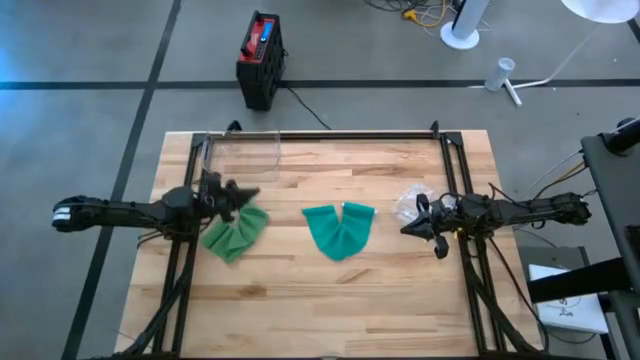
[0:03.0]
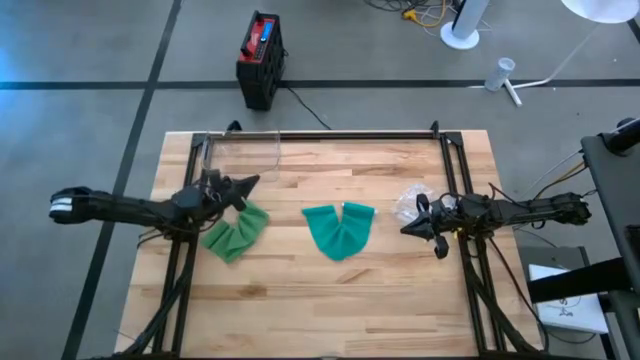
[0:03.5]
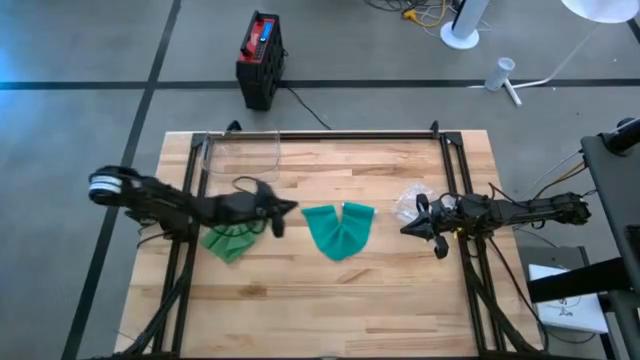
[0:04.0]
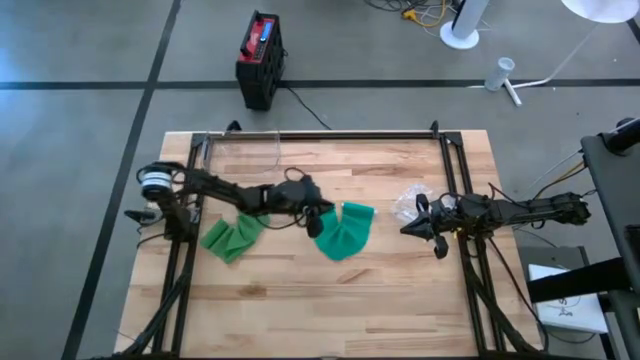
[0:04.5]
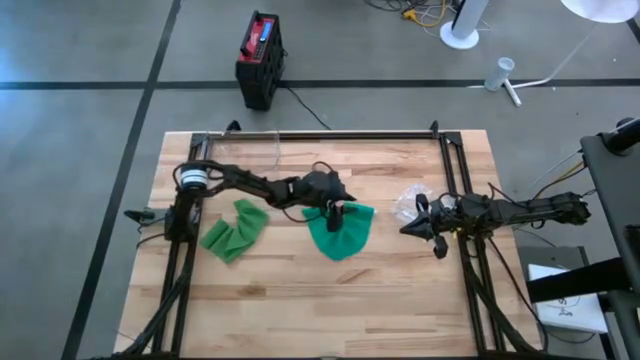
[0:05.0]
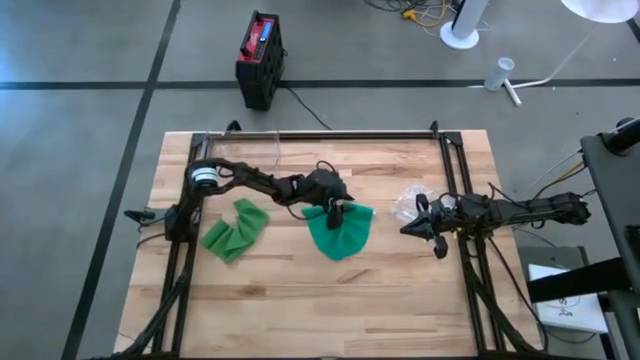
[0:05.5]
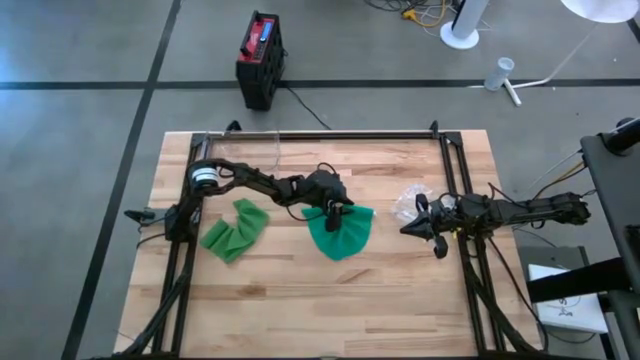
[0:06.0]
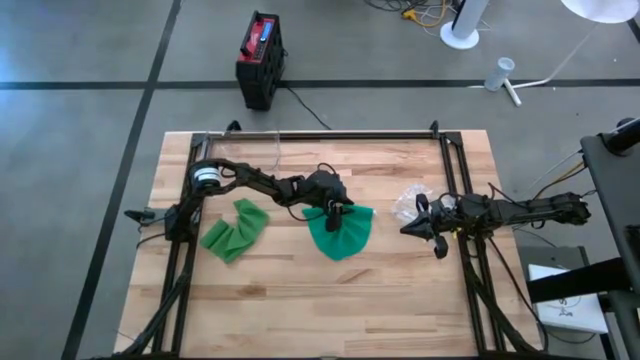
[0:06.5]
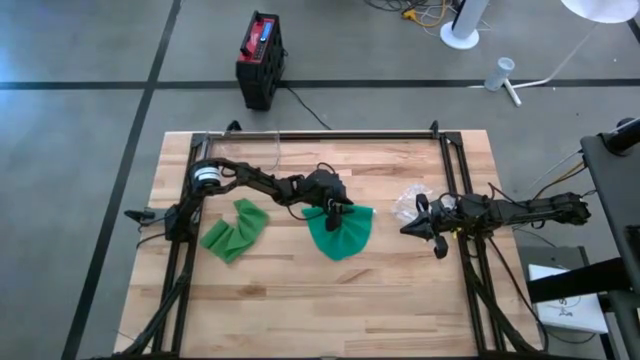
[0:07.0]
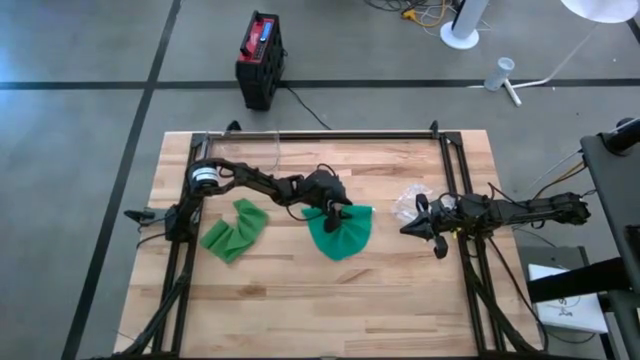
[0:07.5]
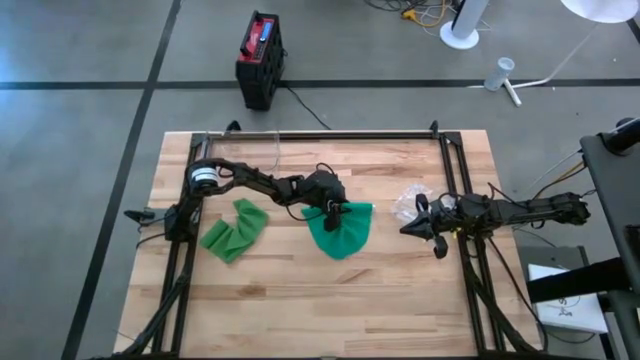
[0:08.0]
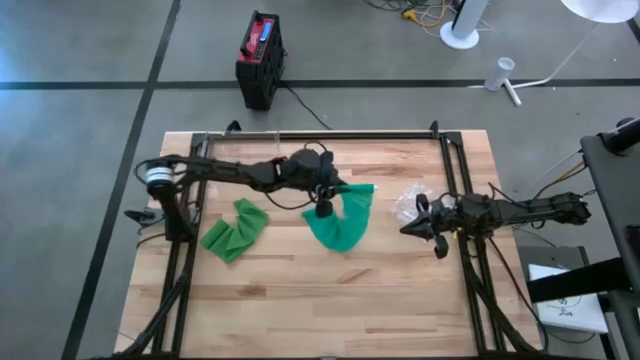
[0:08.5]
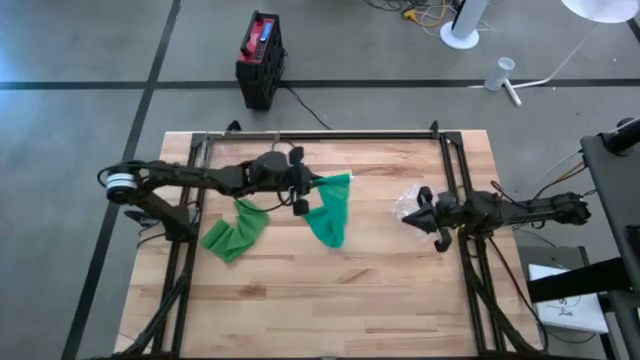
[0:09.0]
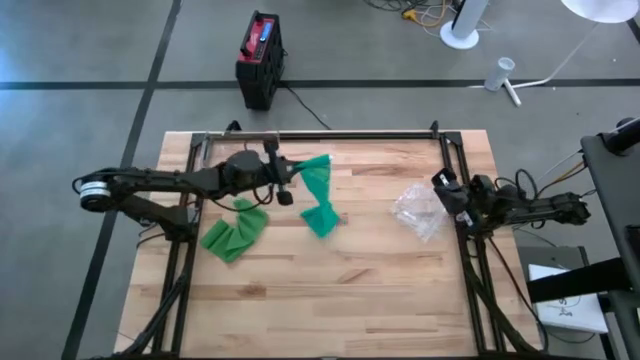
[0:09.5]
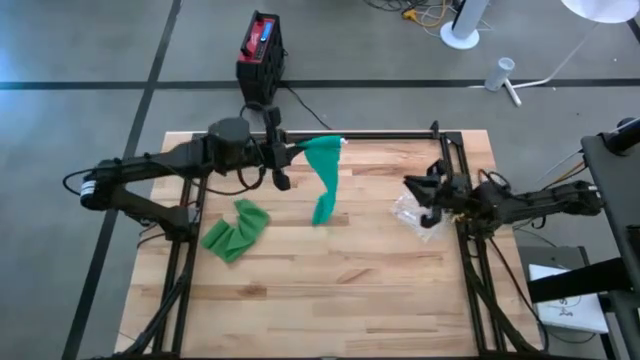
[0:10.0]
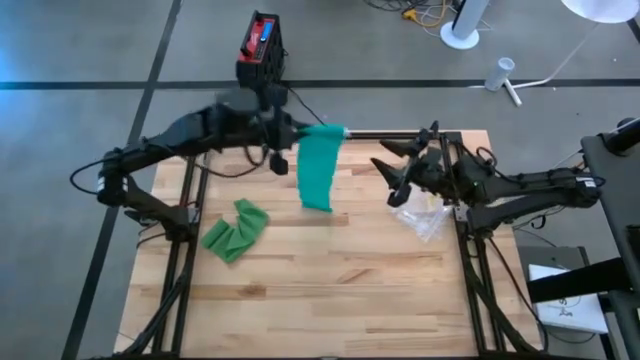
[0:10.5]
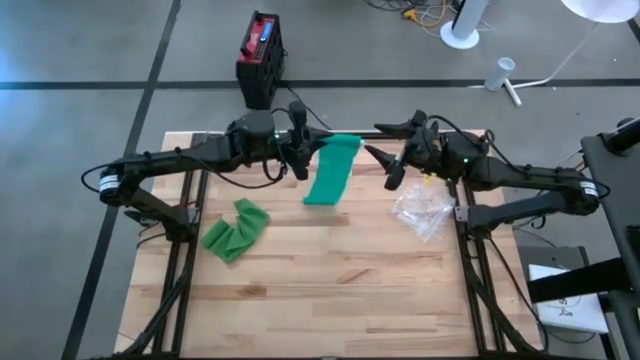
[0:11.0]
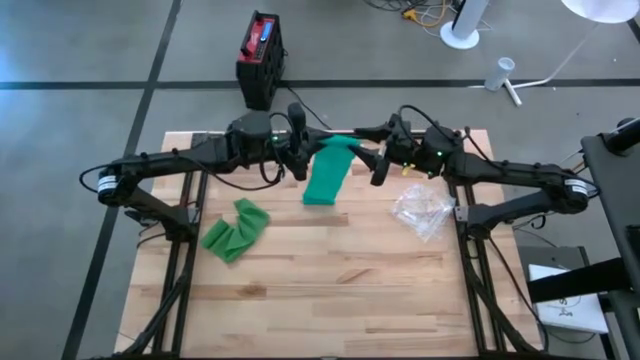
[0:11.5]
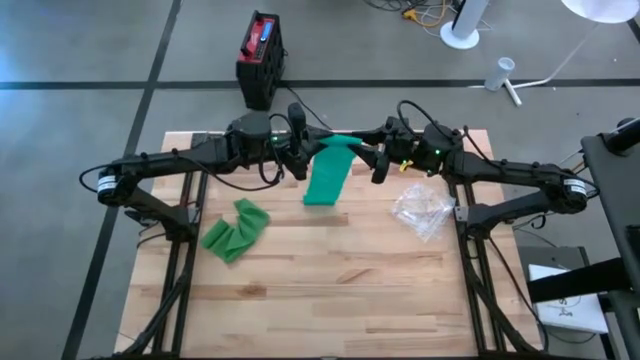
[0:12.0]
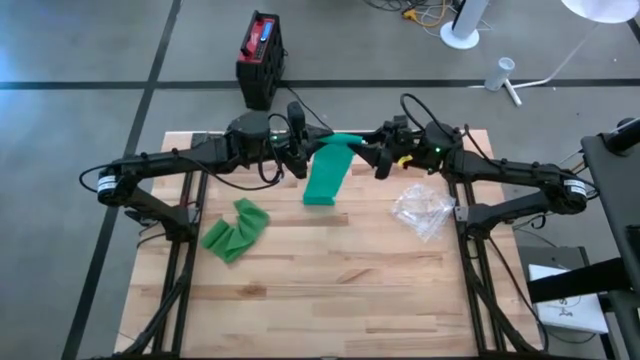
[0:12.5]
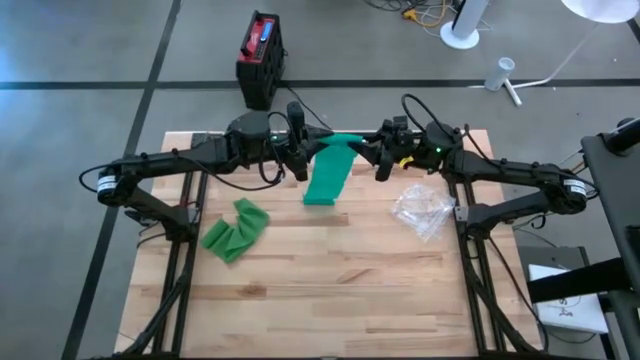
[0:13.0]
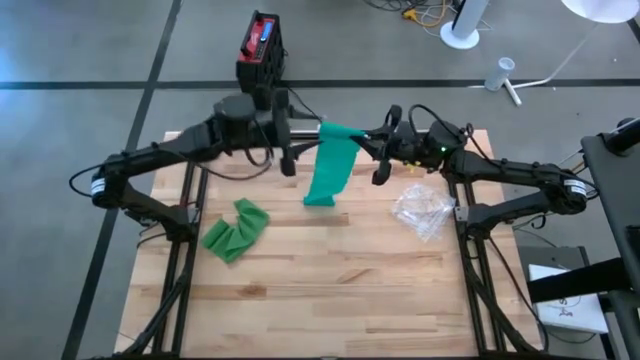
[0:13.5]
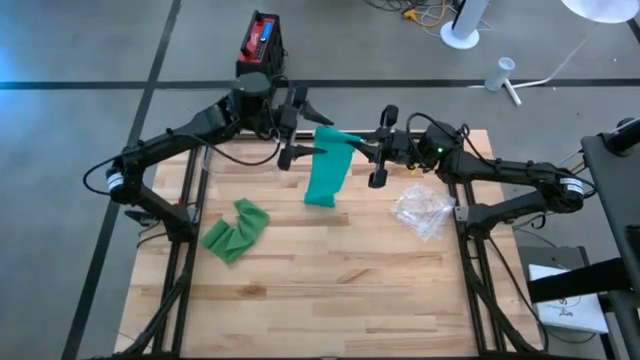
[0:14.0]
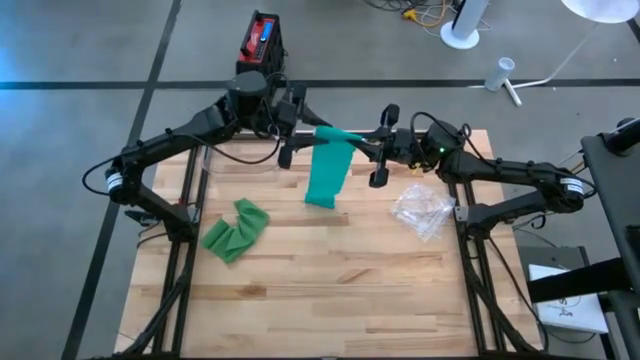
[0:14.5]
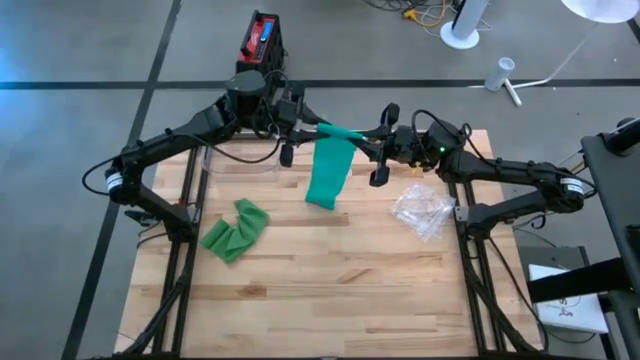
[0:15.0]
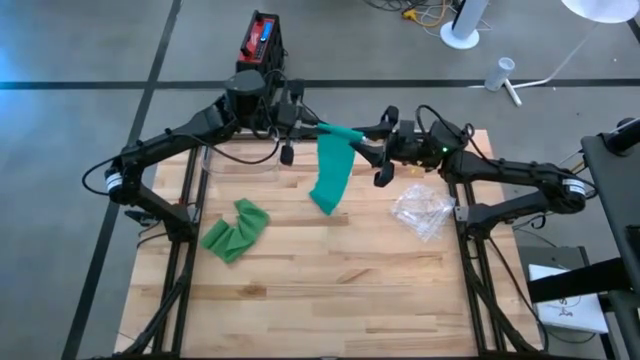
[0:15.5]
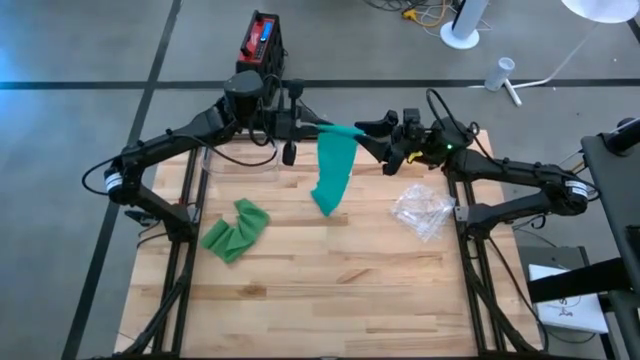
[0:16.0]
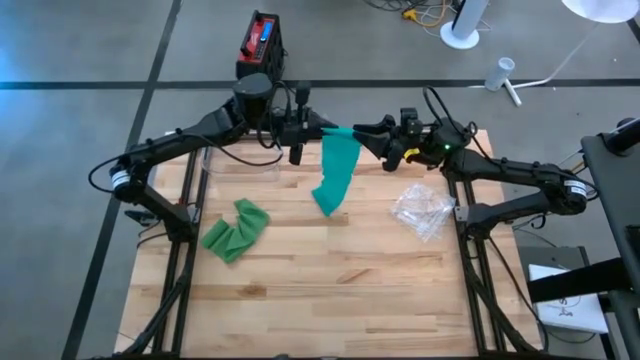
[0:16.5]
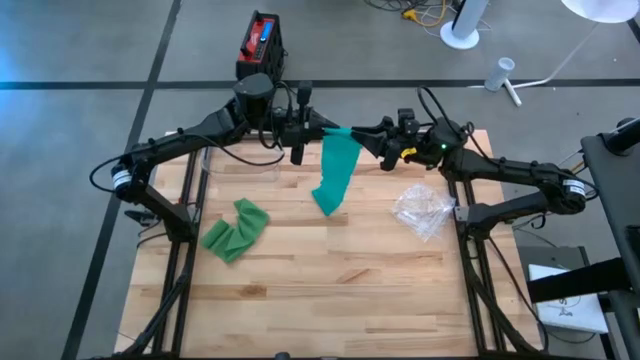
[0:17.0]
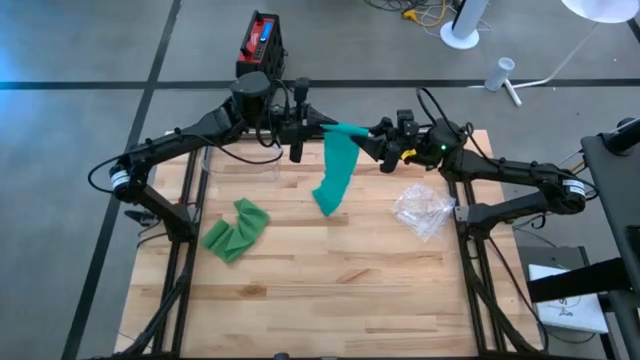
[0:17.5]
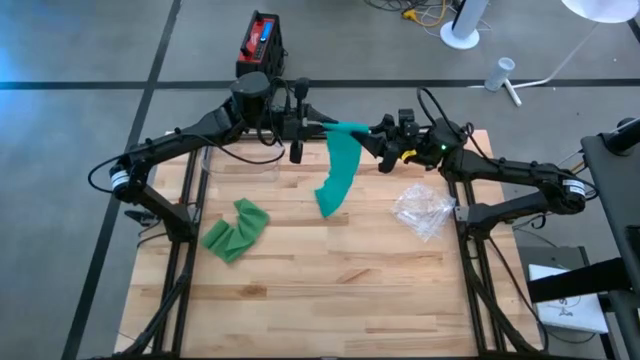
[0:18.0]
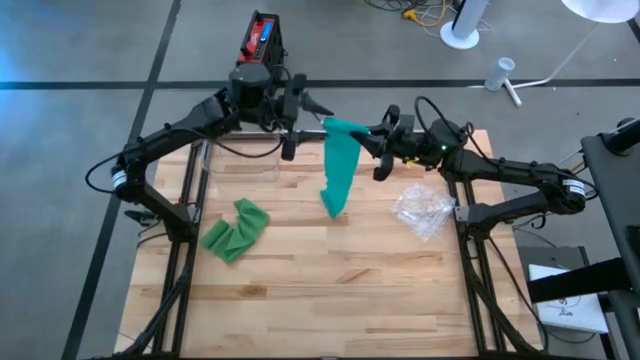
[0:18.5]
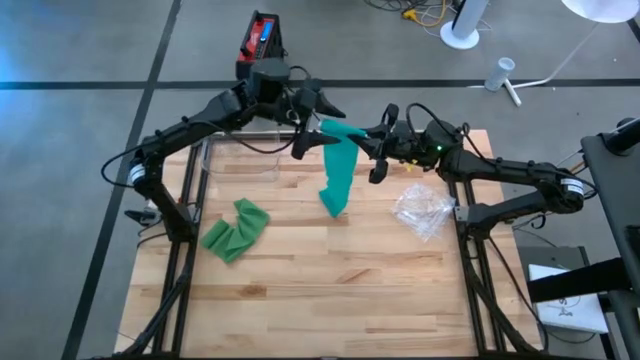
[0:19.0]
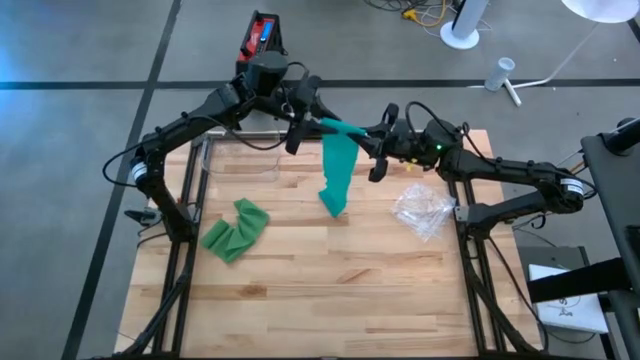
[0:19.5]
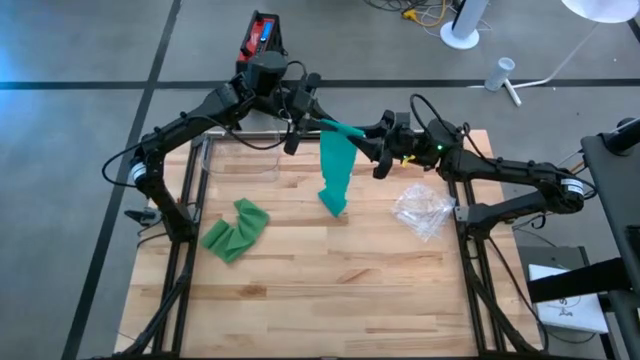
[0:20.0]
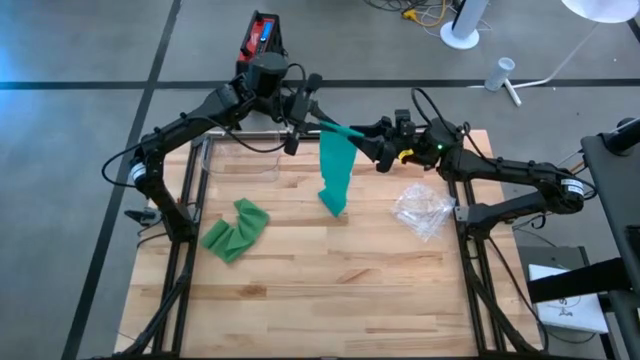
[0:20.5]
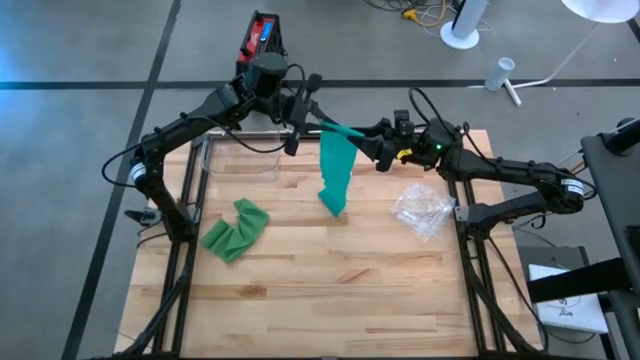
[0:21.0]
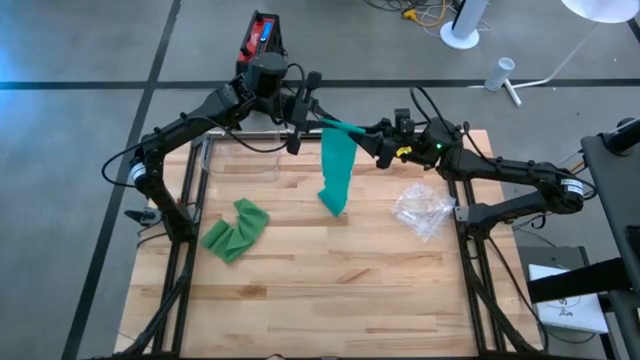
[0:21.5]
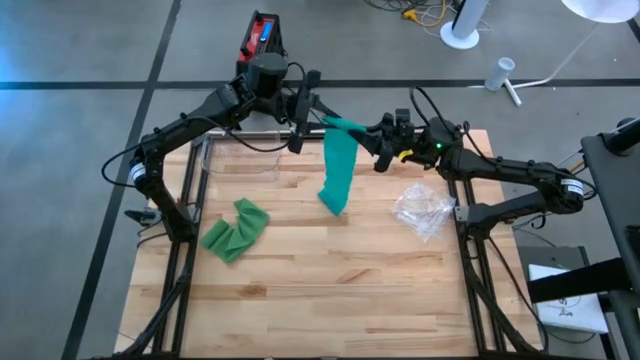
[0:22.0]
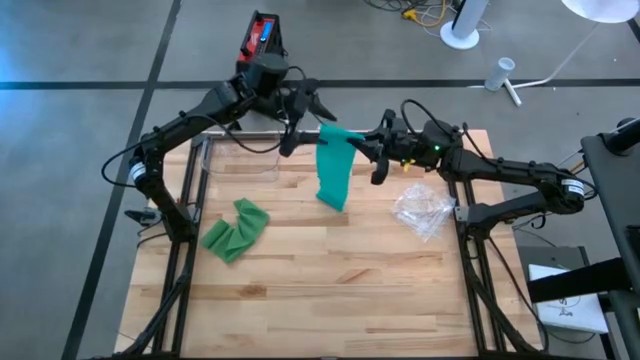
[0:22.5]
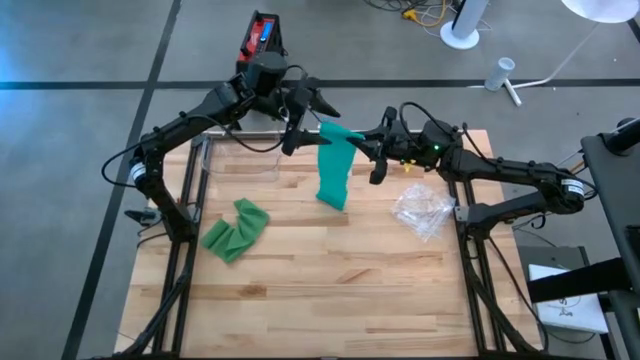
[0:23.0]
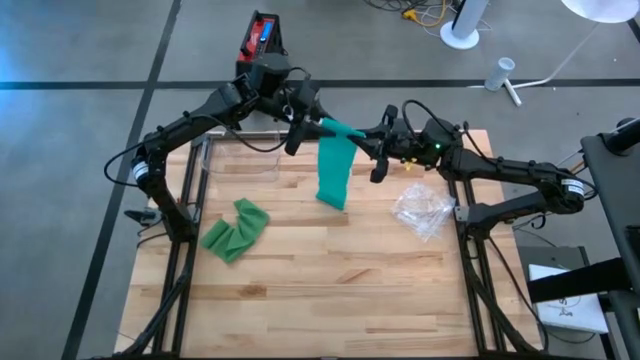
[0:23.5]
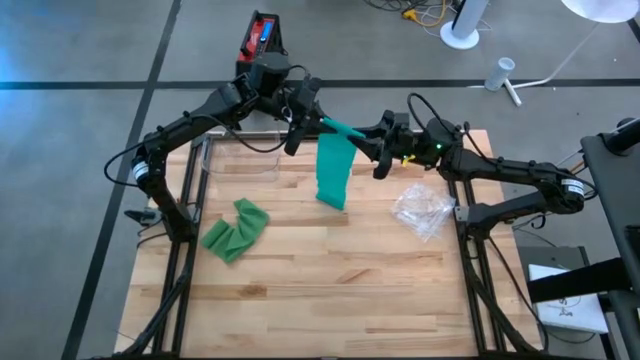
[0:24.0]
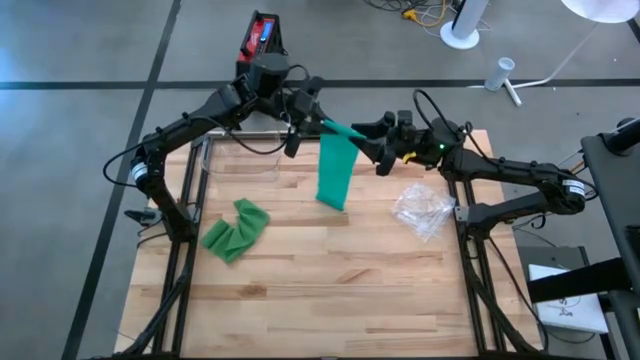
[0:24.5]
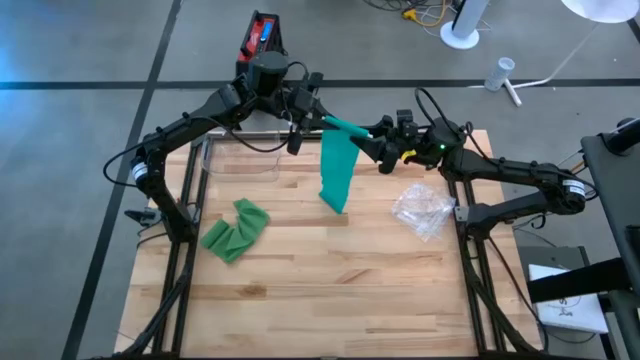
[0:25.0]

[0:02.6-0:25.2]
Task: Roll bandage
Roll the blue bandage
